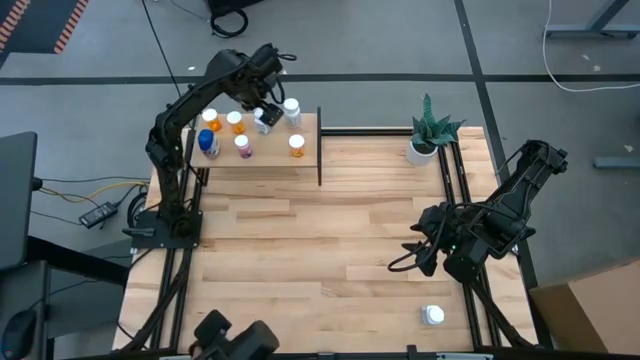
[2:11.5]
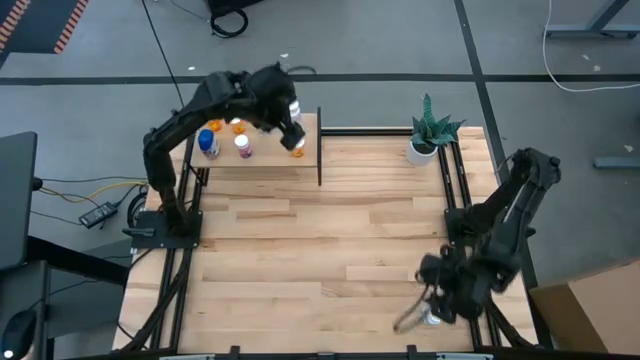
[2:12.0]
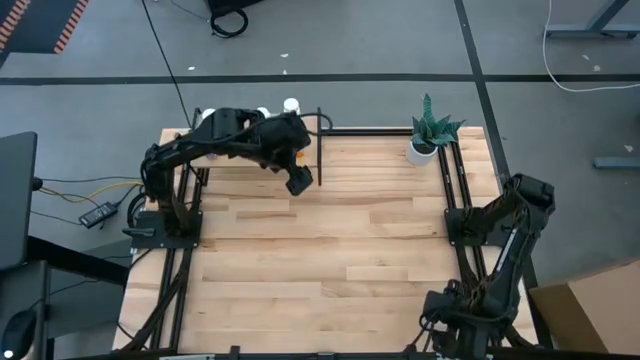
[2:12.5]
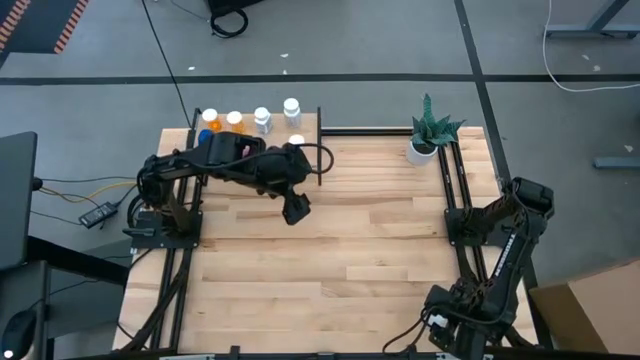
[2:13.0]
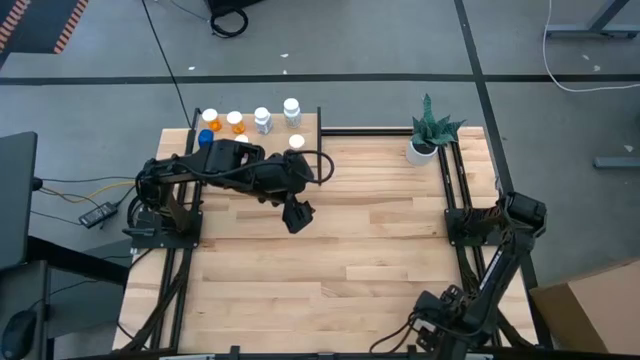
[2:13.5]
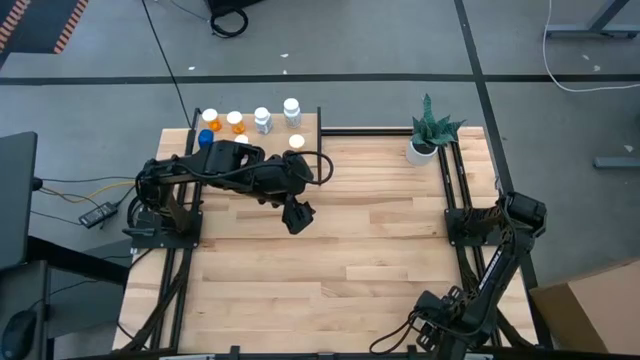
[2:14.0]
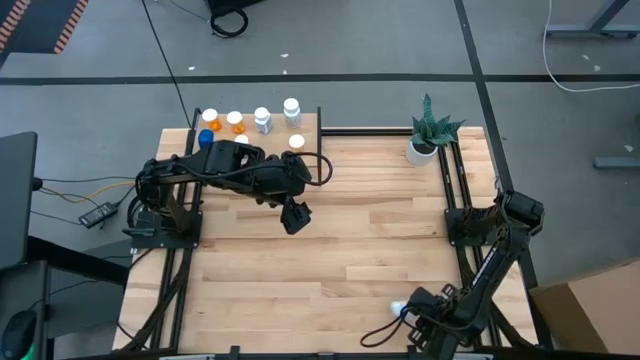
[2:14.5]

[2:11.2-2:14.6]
Task: Pick and place medicine bottles onto shelf by color
Put the white and blue pill bottle on the shelf

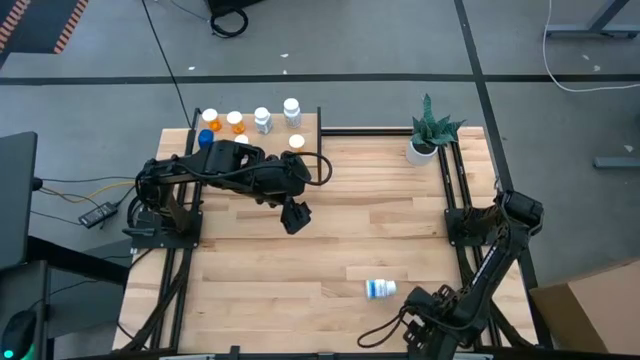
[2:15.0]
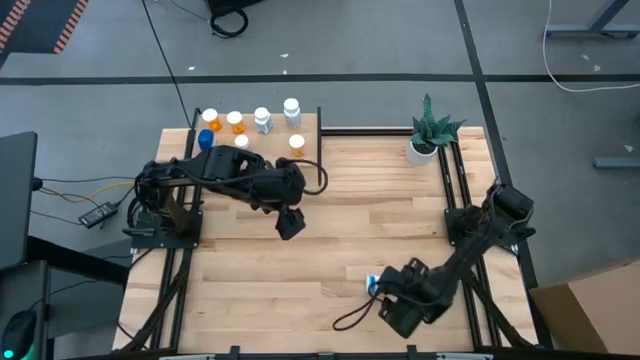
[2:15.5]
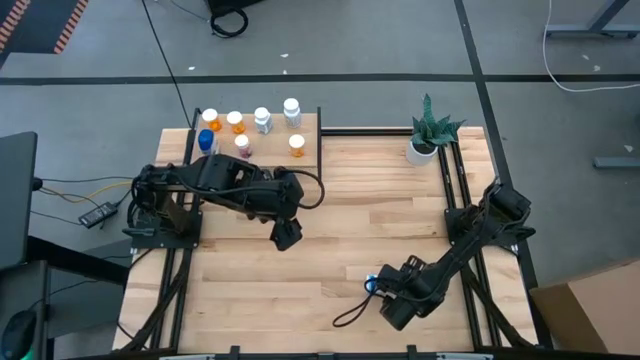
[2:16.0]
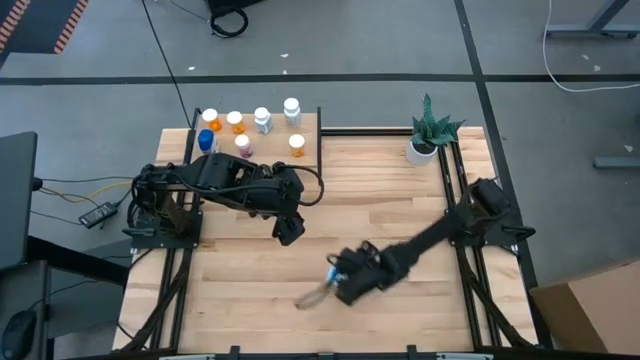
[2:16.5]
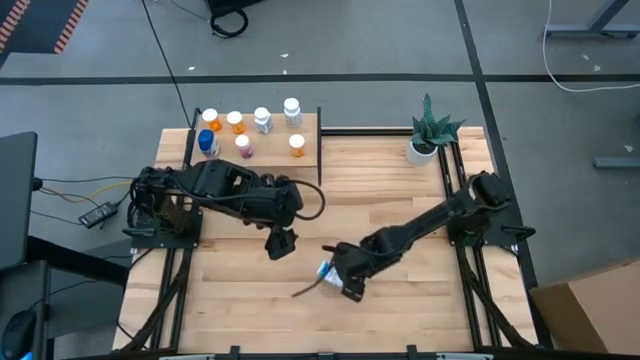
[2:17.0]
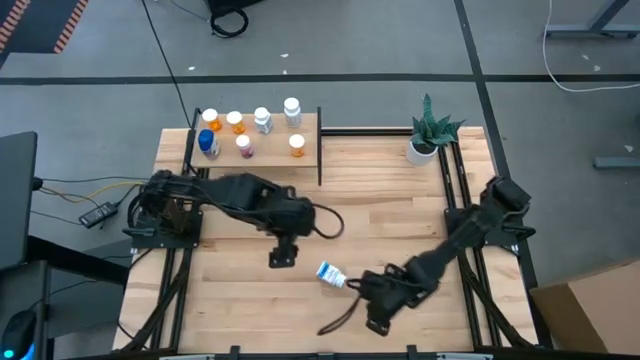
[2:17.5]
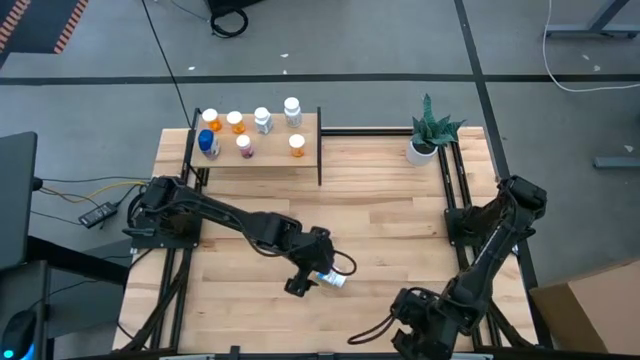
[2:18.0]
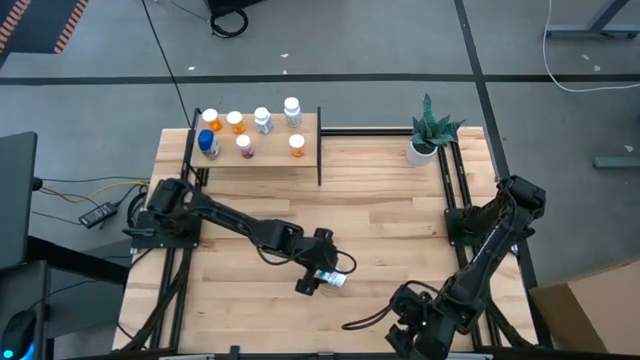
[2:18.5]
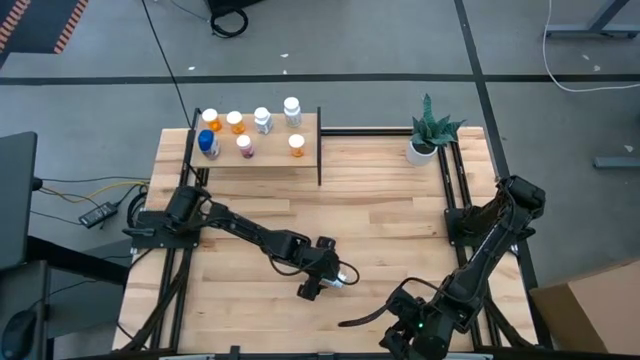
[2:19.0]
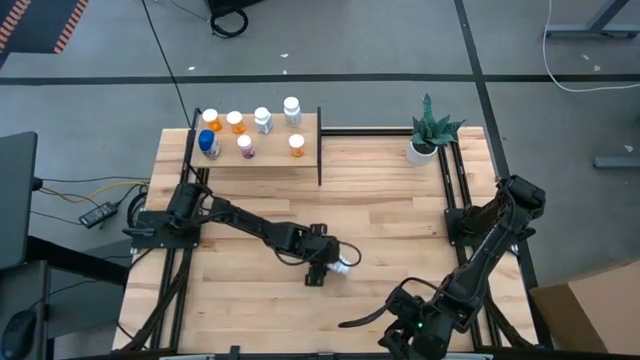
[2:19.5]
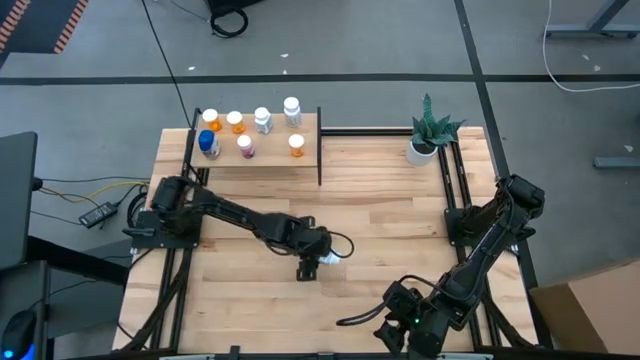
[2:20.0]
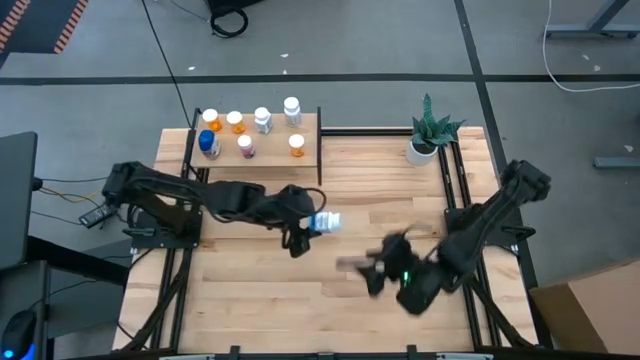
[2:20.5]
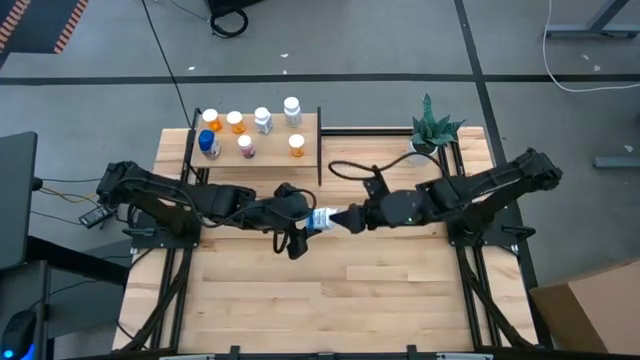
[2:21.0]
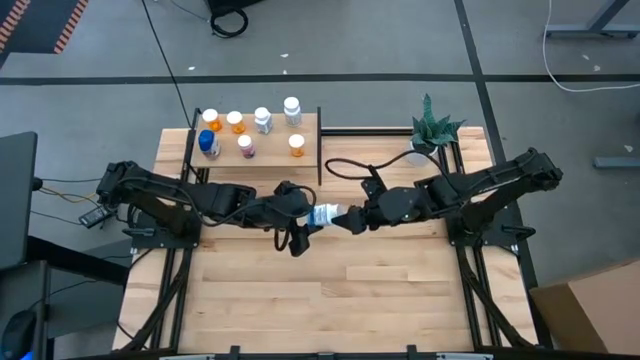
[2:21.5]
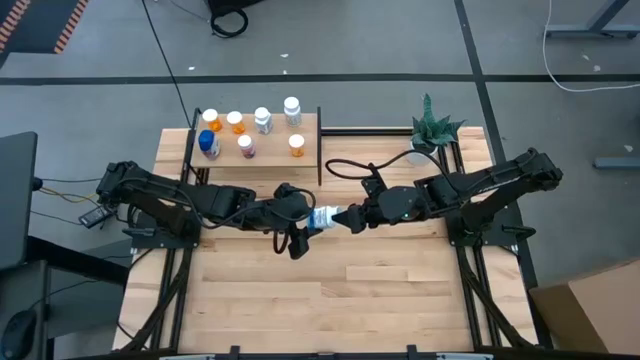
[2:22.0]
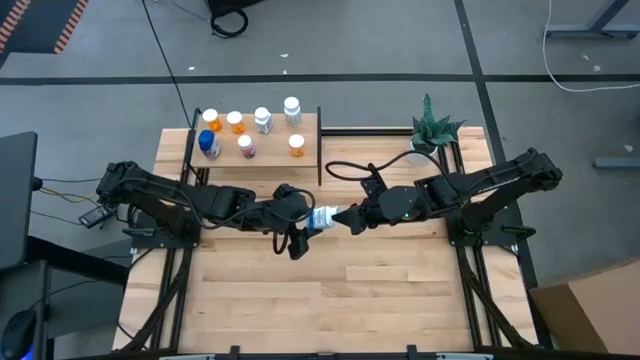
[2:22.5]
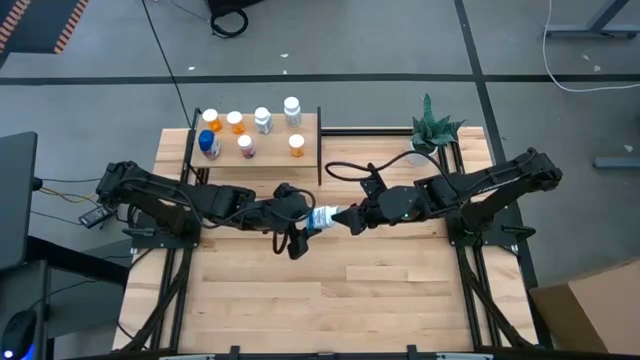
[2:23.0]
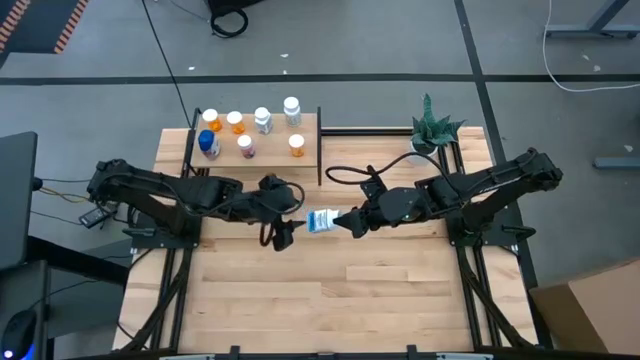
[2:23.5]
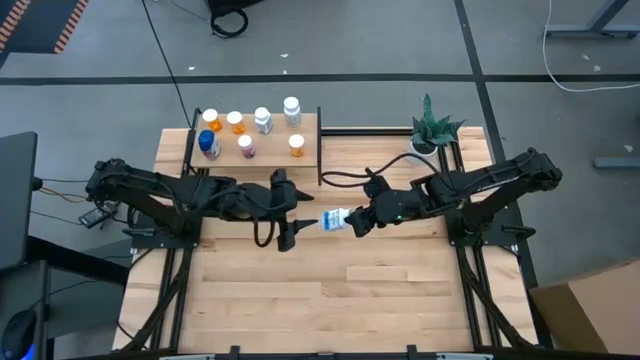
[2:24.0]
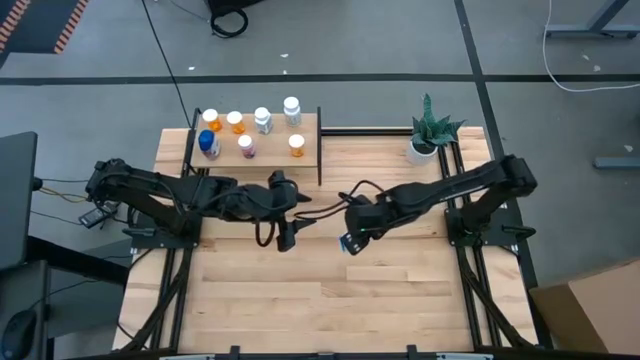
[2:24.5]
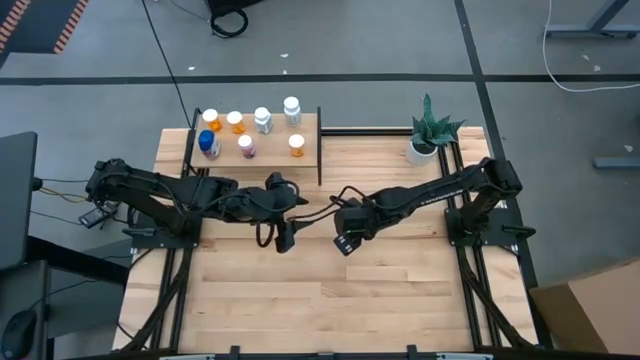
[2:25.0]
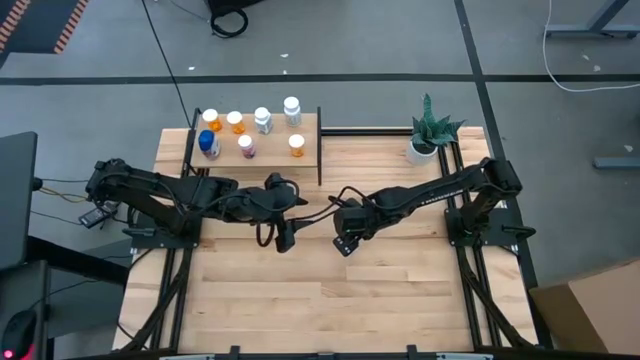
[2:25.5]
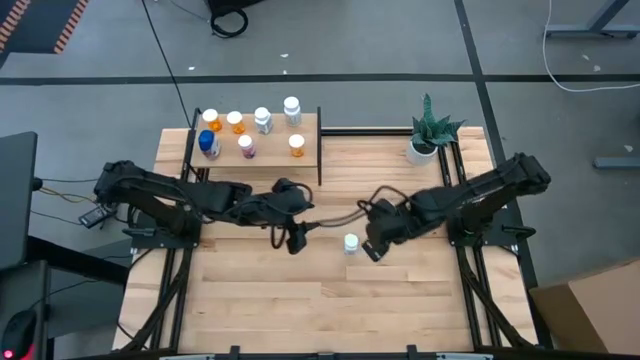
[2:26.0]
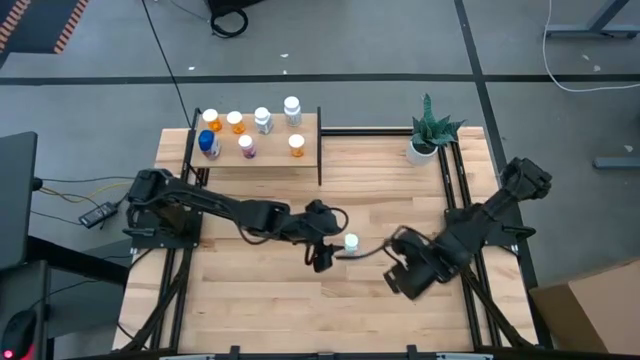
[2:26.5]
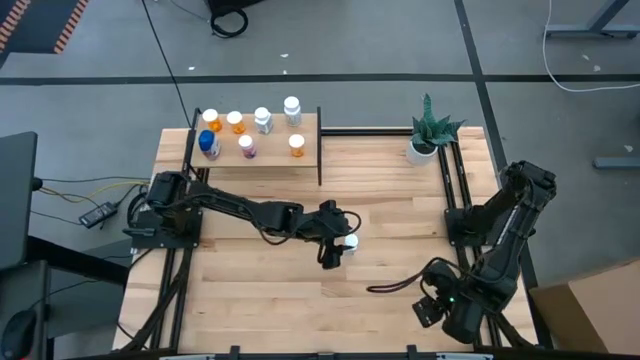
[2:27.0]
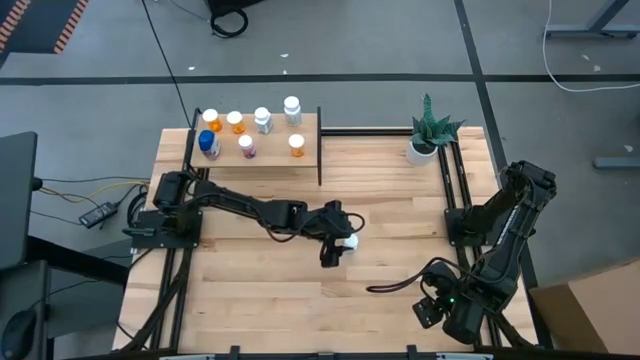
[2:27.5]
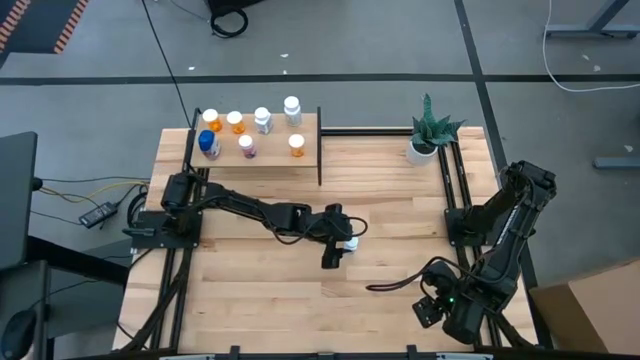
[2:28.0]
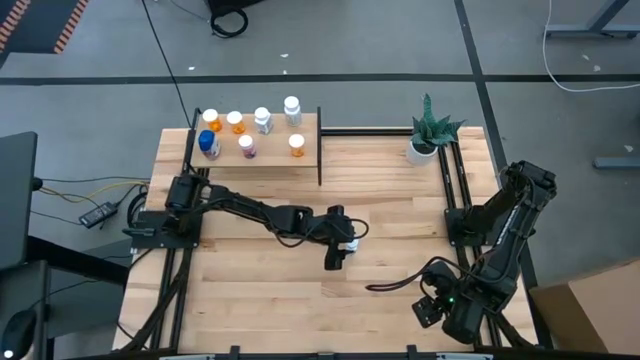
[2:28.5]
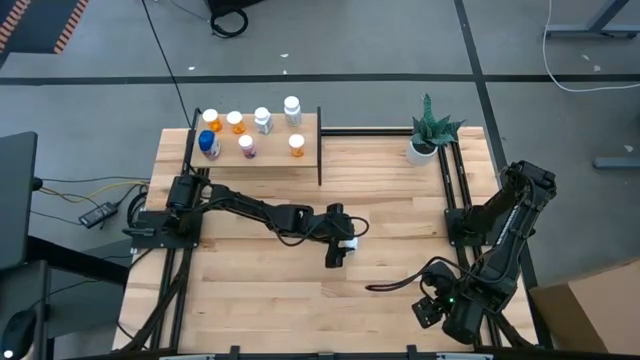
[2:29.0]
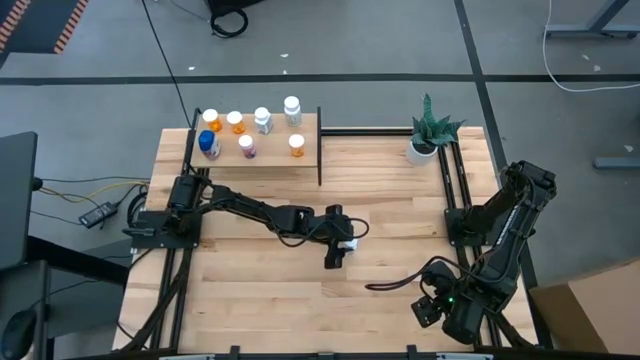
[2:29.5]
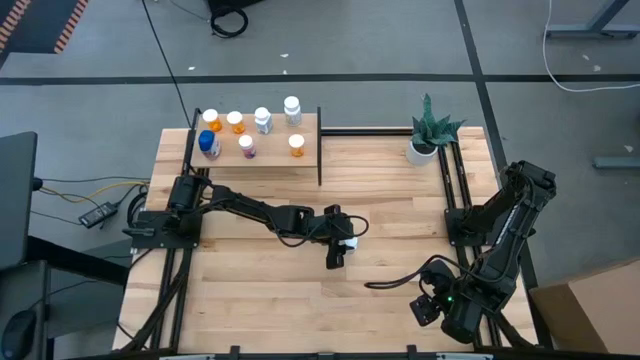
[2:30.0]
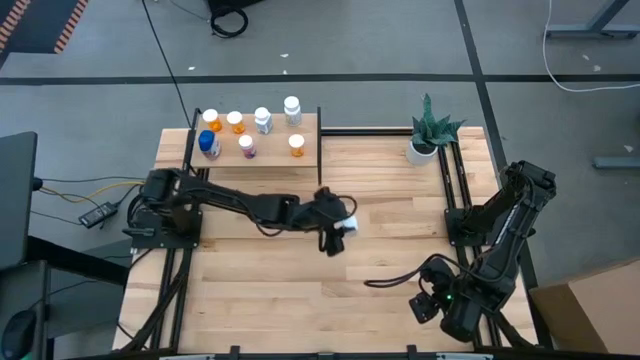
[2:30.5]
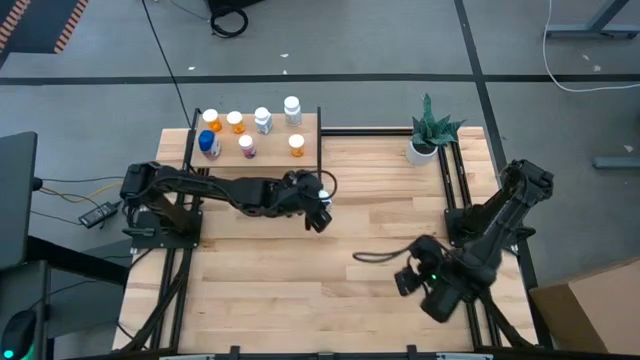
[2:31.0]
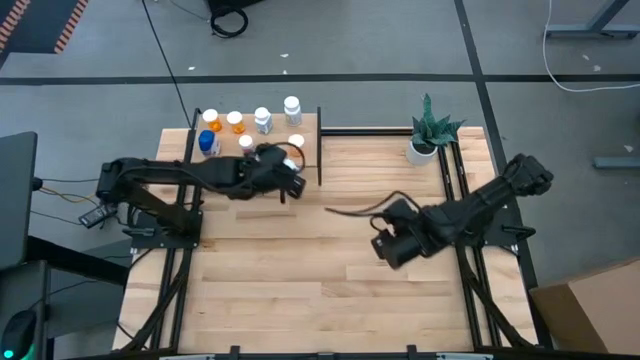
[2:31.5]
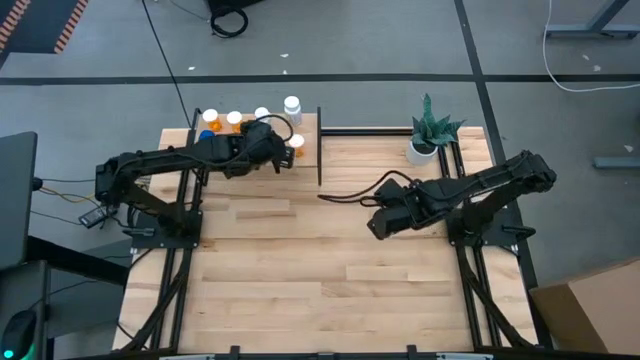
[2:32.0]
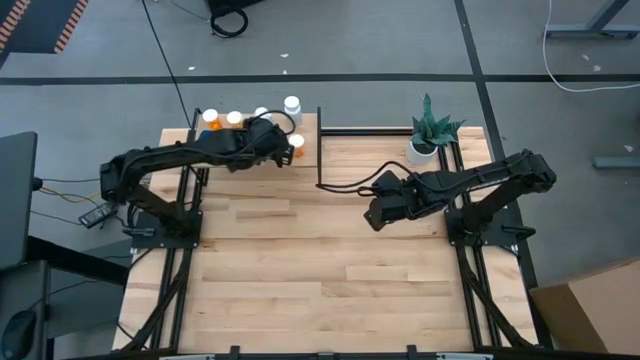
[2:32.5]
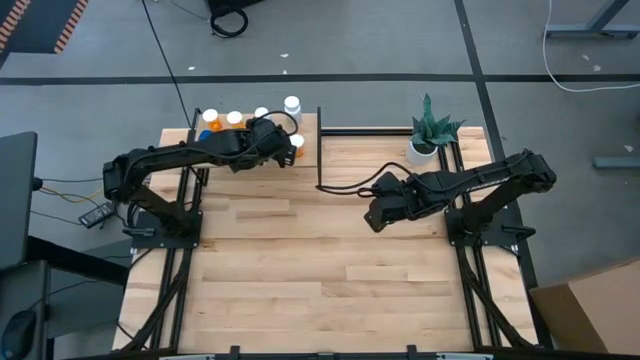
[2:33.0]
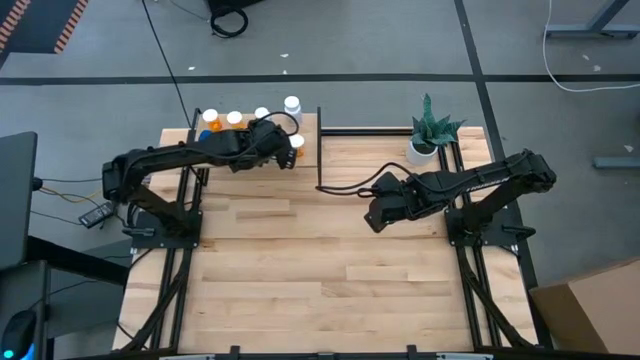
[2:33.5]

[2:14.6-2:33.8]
Put the white and blue pill bottle on the shelf
